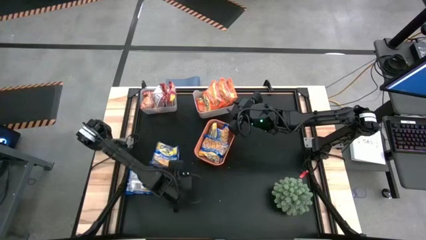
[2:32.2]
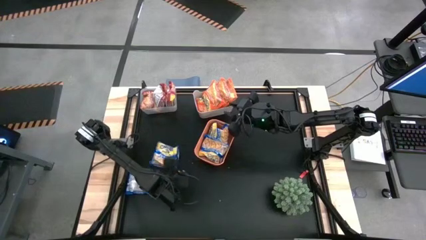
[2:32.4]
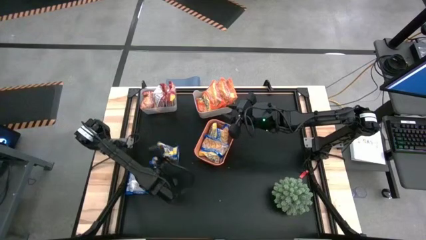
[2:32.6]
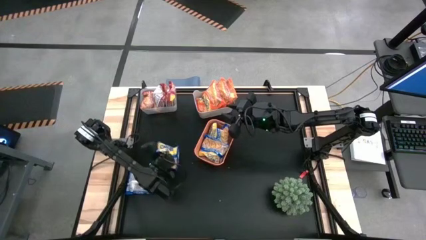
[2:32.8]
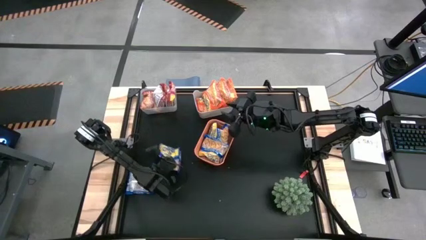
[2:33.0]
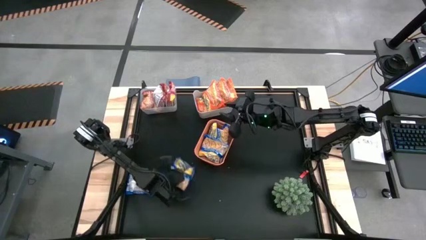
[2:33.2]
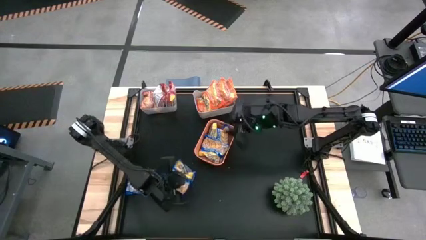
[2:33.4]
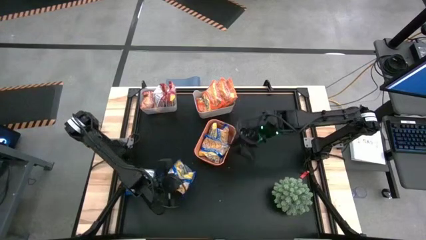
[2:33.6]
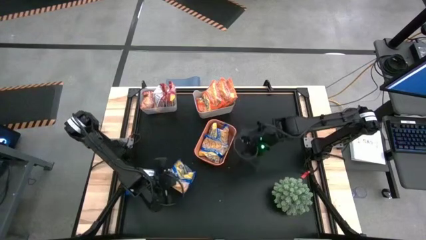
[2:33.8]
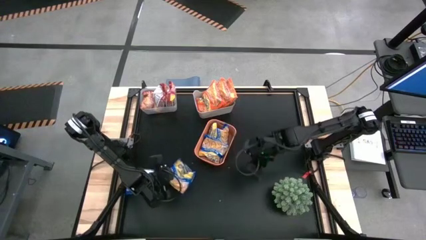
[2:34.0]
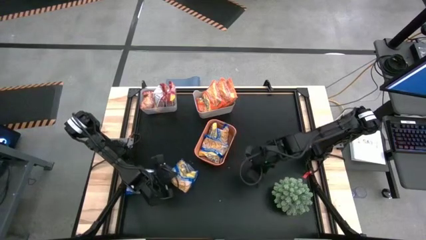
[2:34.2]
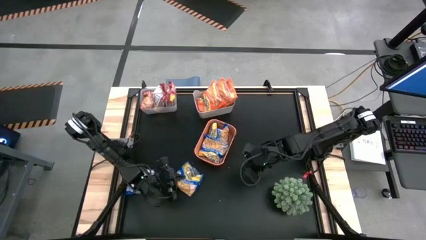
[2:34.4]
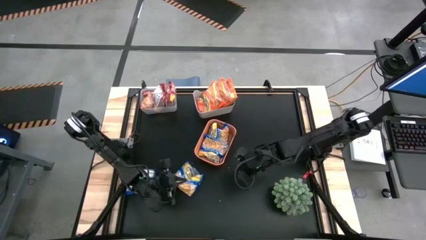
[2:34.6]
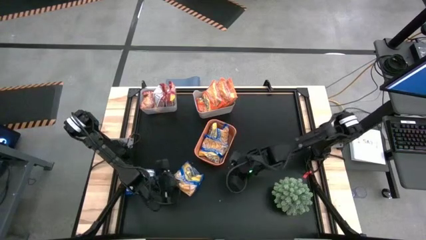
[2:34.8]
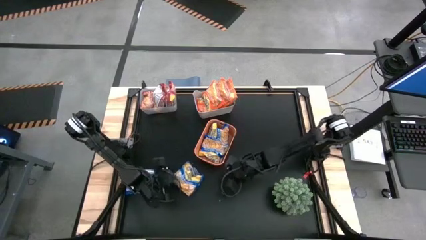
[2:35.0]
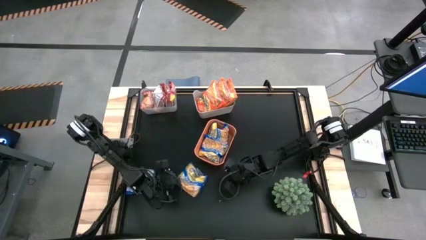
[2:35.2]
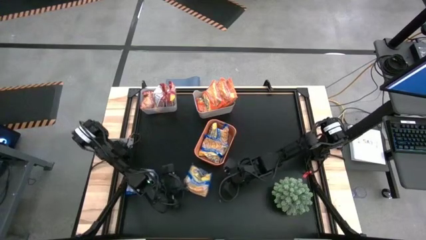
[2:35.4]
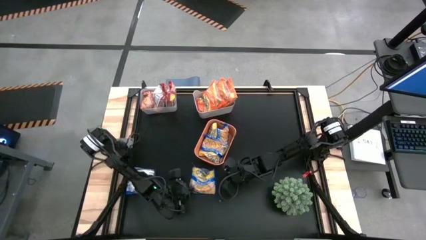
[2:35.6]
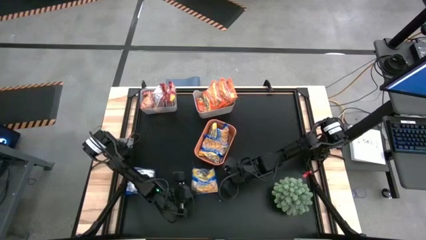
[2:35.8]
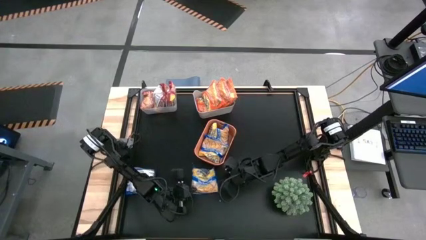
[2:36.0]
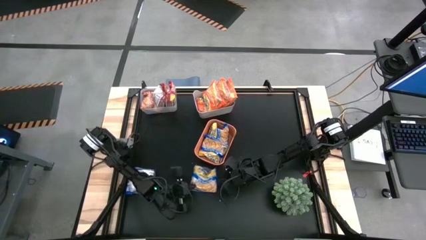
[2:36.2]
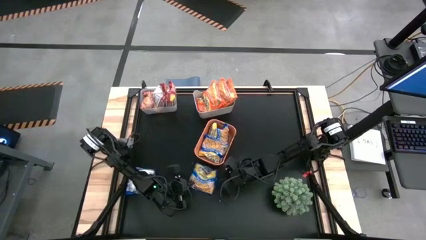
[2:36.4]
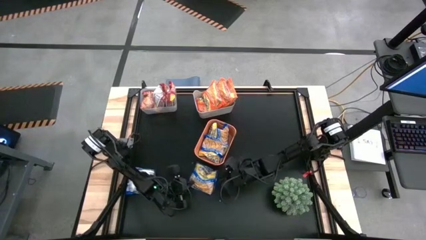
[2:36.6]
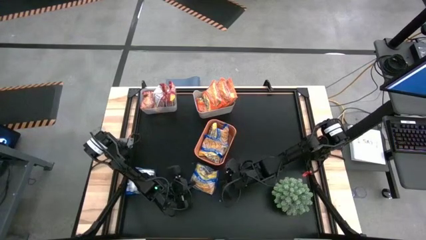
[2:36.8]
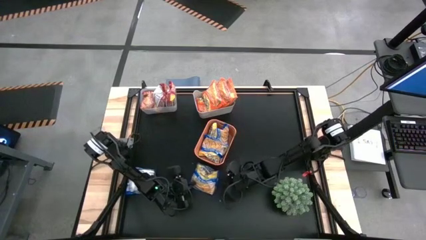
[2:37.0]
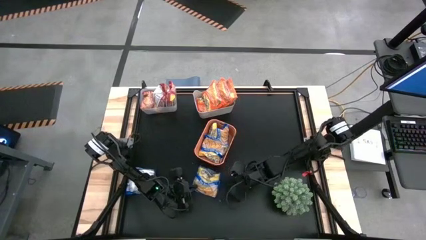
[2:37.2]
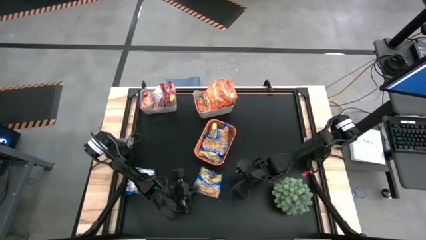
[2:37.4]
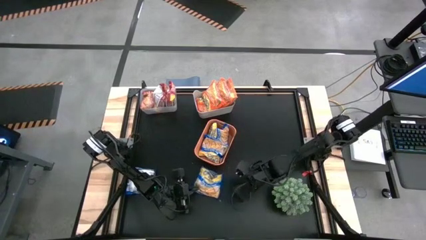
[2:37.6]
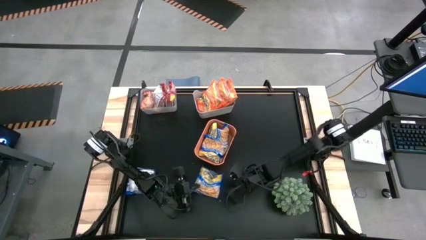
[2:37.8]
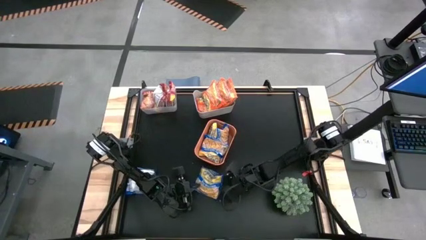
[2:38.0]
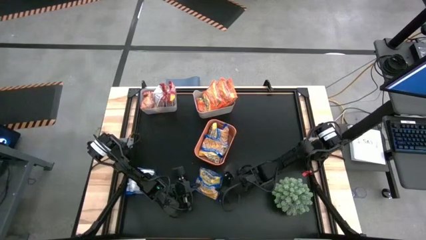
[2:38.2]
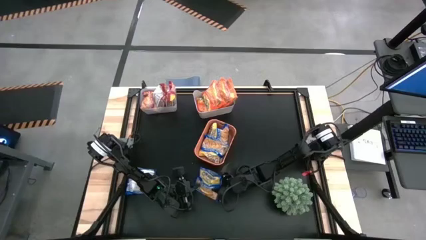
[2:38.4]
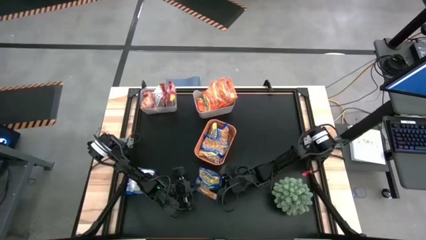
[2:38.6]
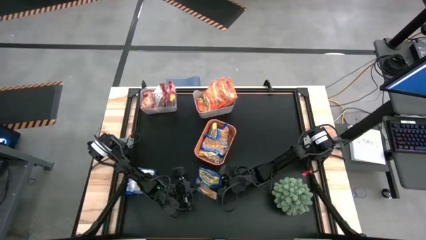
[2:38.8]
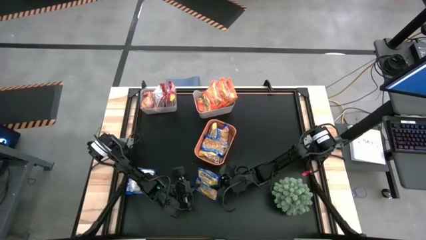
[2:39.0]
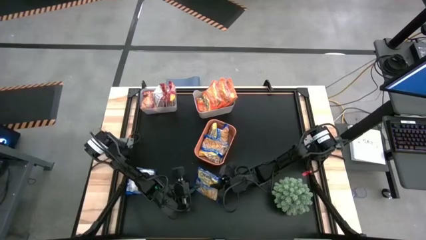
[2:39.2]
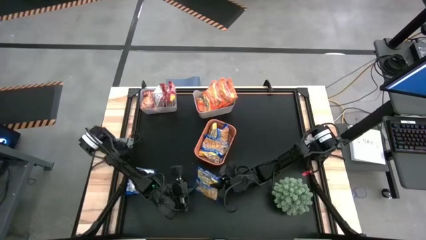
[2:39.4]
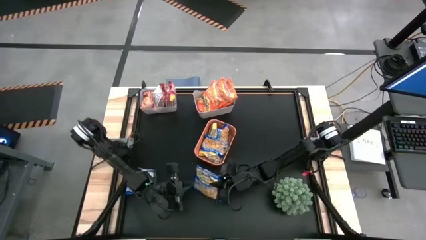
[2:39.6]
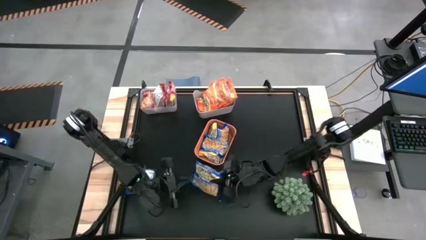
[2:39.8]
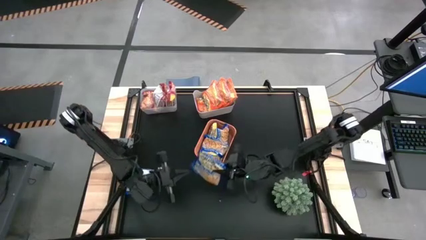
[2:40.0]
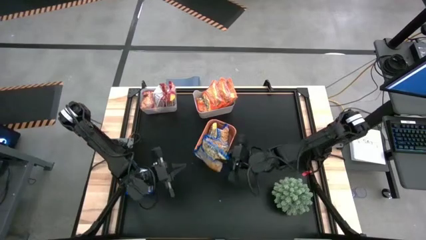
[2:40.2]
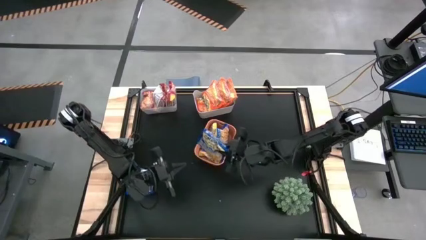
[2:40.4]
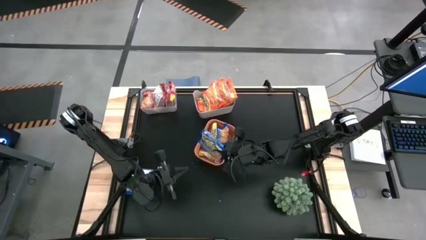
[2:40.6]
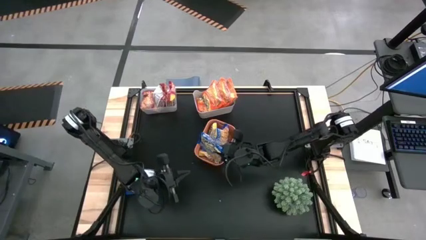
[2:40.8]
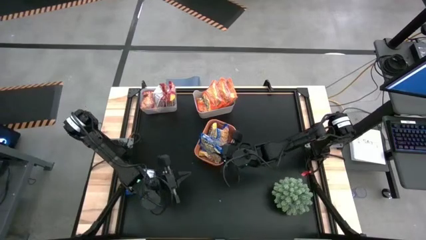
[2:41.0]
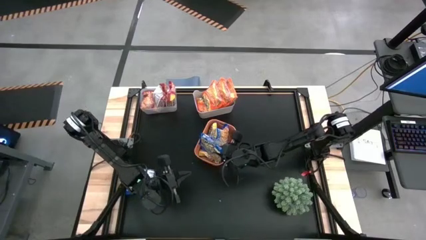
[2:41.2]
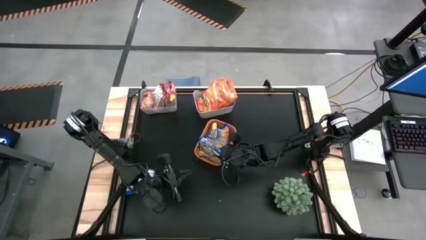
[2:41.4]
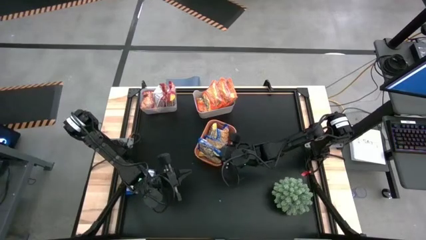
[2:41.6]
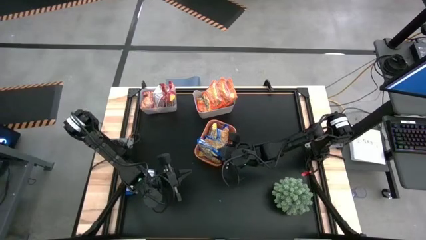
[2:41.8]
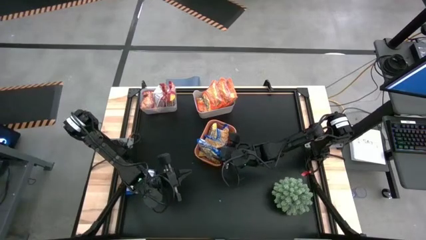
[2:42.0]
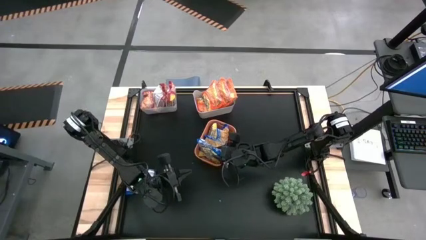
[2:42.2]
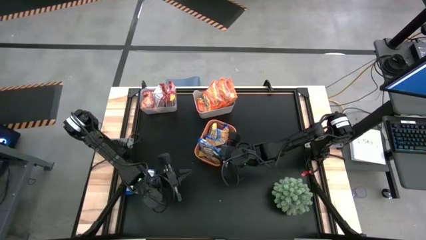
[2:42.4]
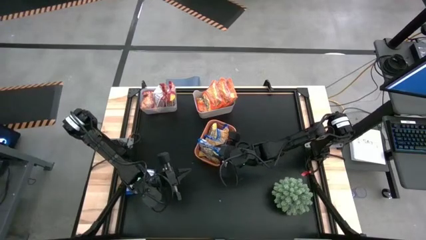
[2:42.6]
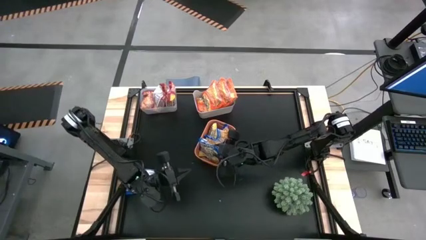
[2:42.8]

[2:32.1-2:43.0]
Task: Sort Maruchan noodles
Put the blue bag into the orange bin

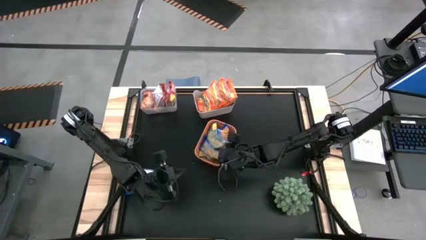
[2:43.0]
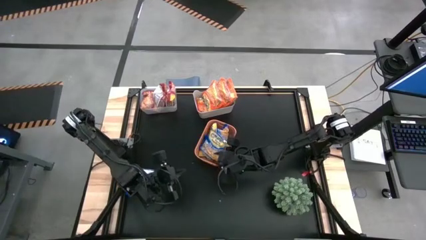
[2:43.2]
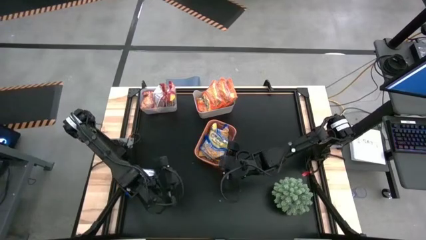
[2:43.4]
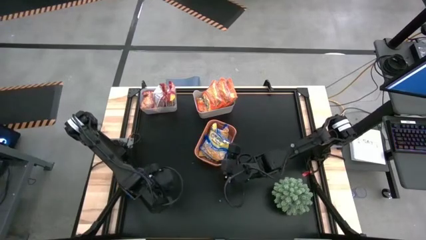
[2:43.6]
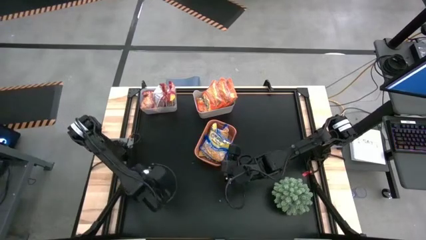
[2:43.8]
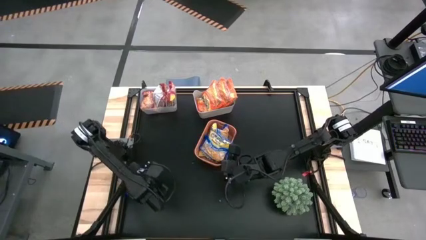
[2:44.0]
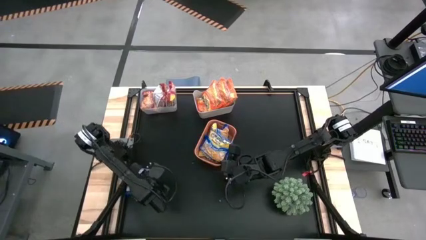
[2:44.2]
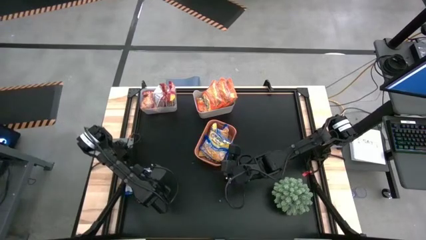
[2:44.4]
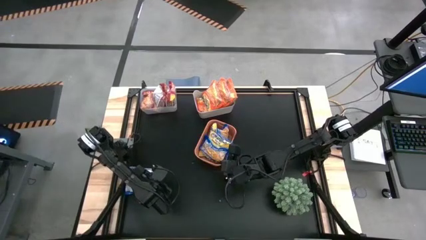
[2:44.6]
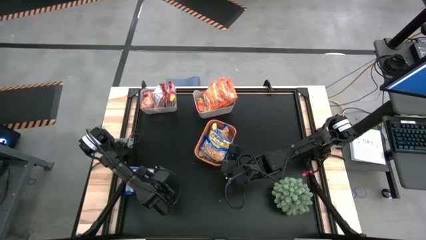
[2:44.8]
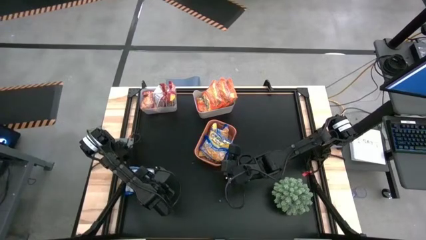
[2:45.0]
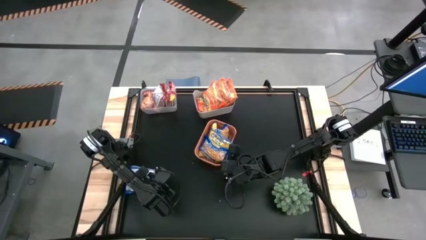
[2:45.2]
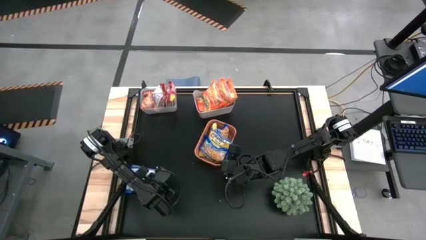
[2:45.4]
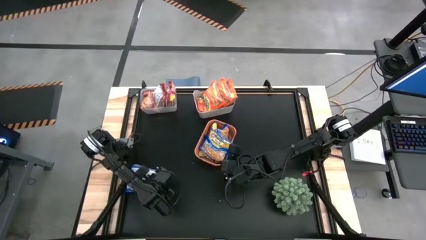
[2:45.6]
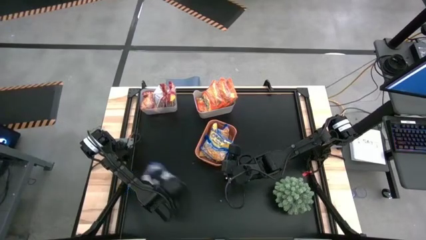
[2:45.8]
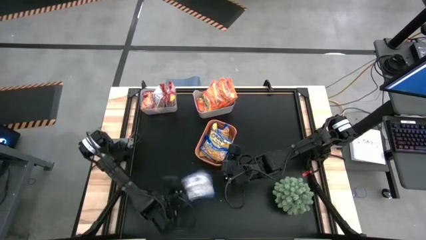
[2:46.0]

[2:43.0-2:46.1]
Put the blue bag into the orange bin
